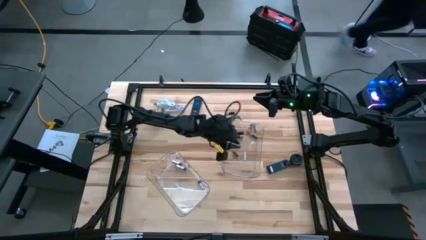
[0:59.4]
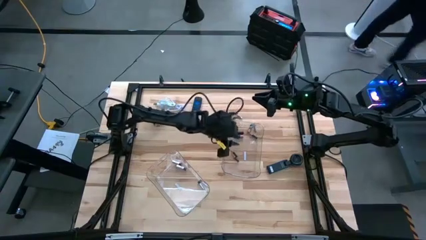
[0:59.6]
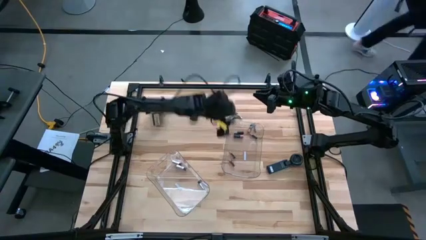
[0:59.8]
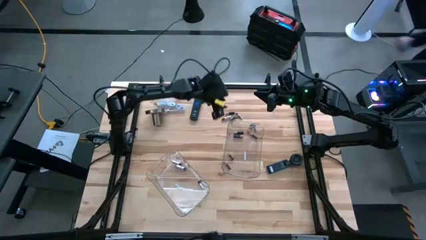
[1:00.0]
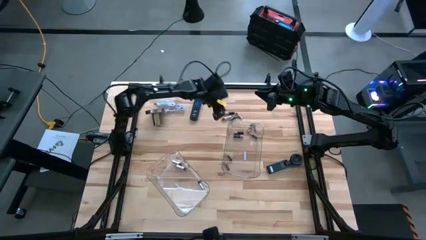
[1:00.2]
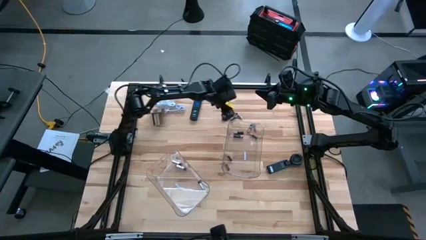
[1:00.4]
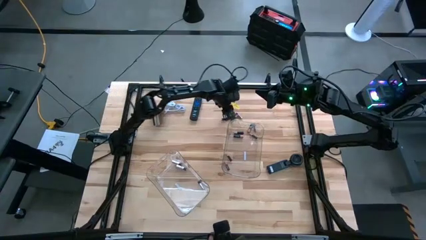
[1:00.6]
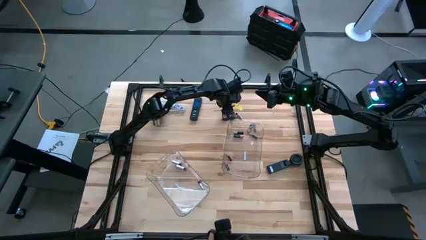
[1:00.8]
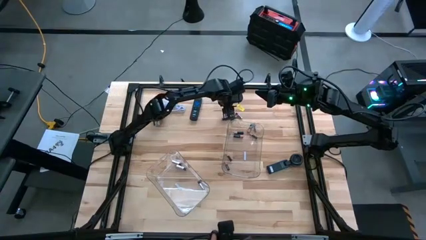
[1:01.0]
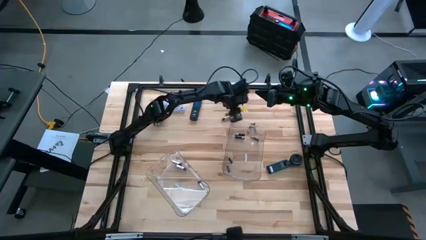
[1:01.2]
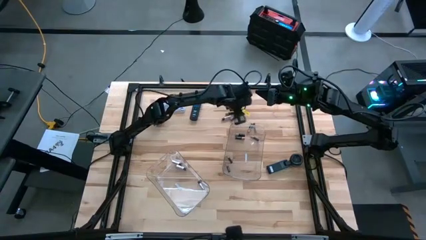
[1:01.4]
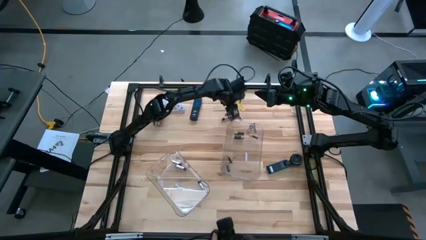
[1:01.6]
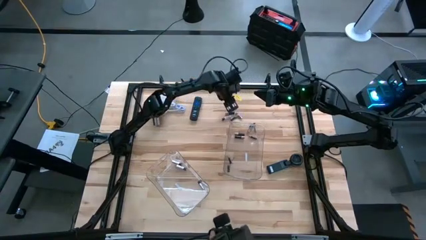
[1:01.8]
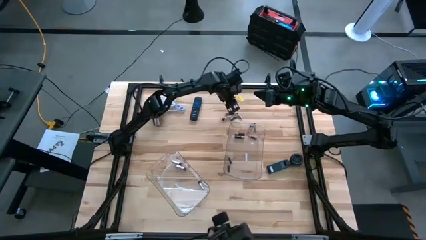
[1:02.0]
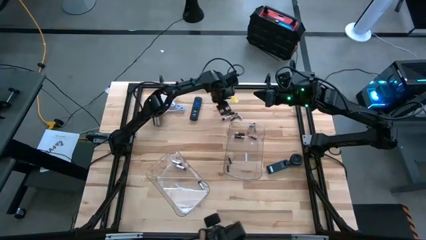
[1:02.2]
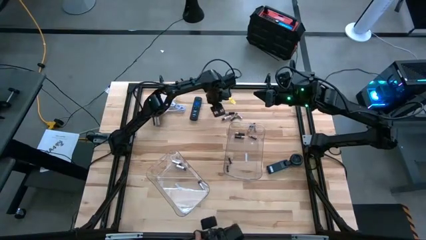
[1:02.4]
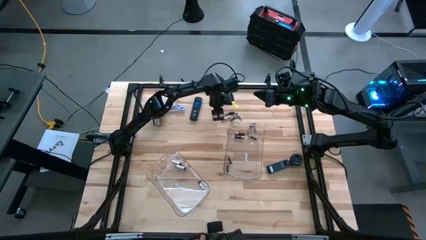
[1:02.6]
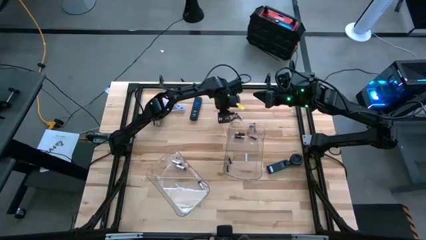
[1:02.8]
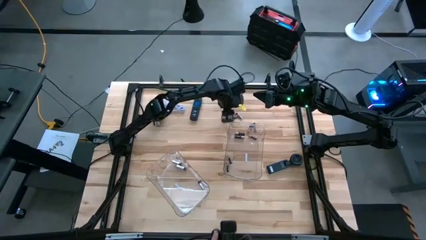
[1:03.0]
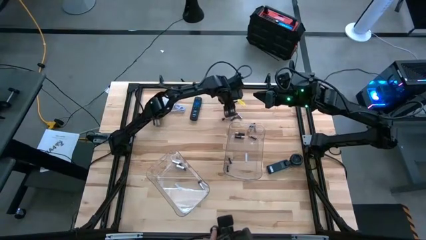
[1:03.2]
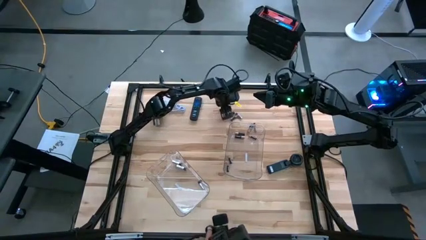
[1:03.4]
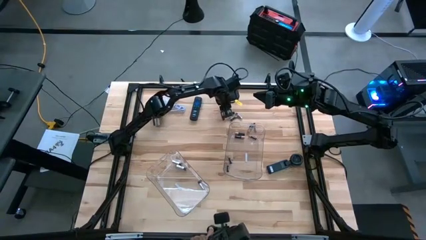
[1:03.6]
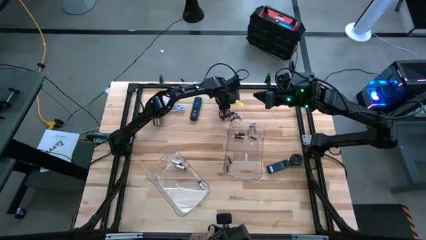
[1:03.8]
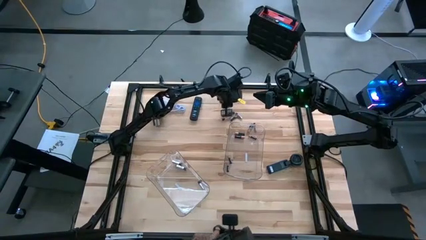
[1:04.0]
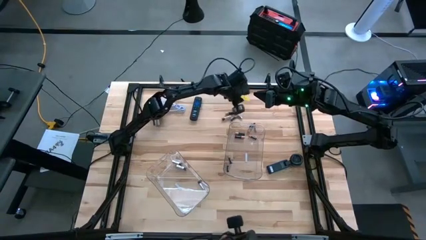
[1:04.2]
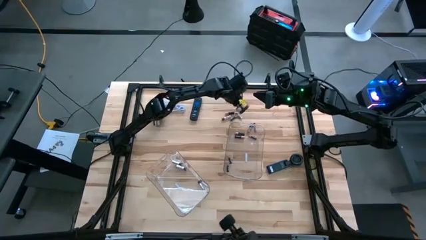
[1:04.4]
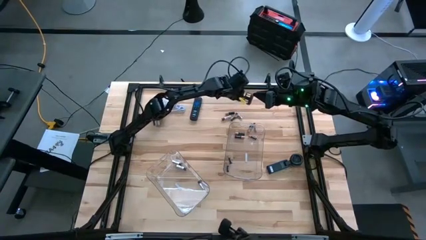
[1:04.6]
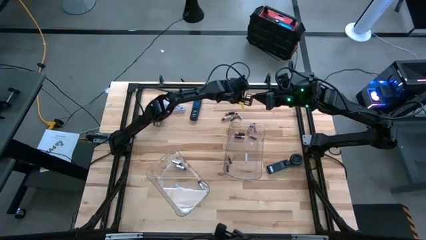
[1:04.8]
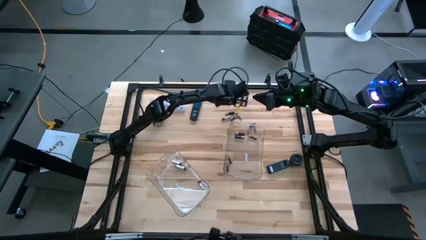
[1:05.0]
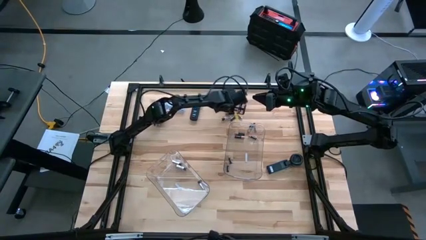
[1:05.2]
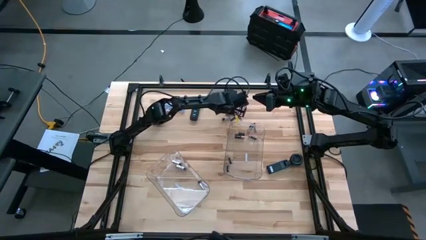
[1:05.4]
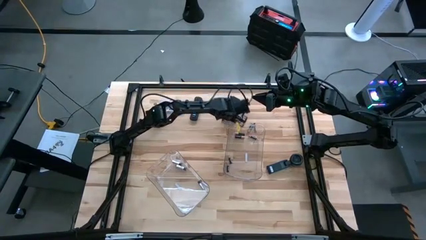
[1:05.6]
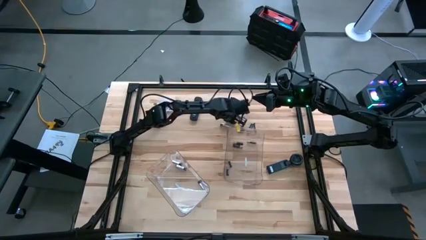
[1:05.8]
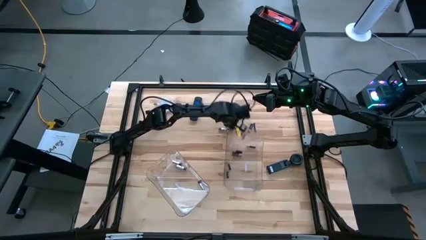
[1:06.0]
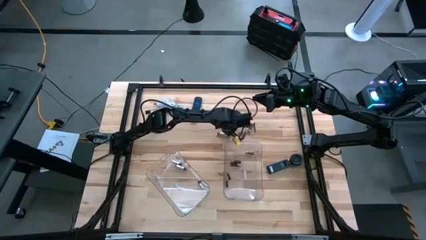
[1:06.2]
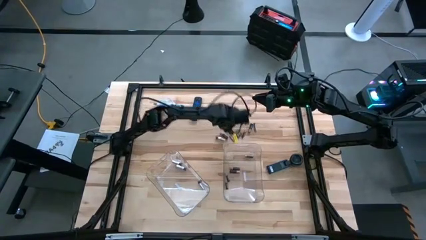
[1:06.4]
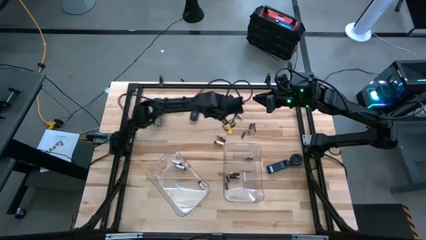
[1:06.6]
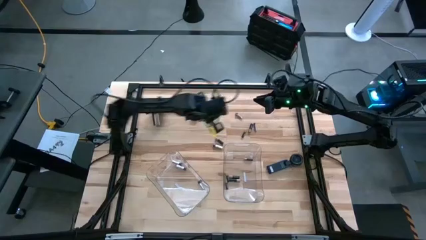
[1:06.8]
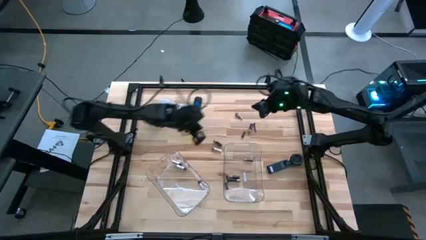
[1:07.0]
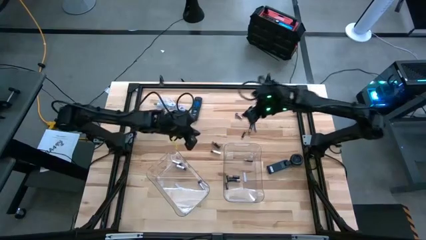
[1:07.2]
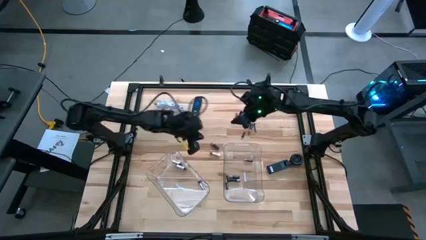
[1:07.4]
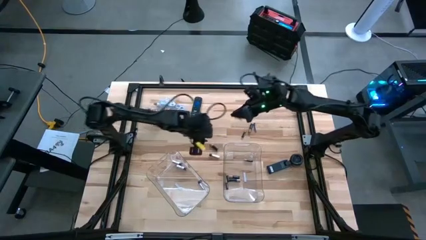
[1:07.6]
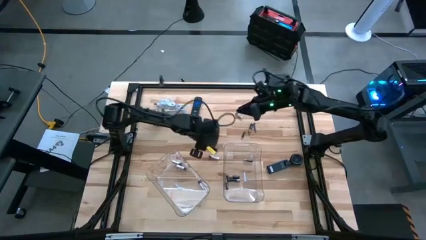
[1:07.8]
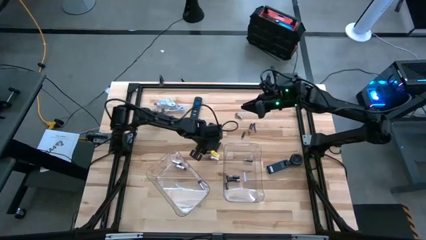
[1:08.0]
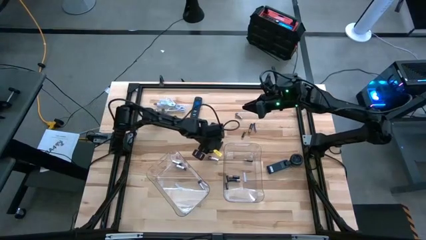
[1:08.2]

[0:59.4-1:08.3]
Task: Sort batteries
Put the black battery into the right transparent bin

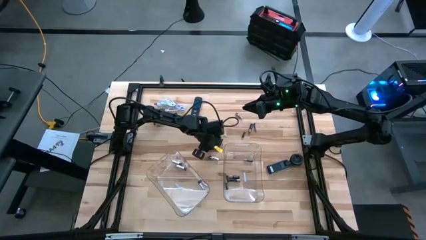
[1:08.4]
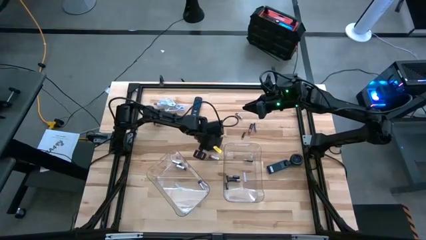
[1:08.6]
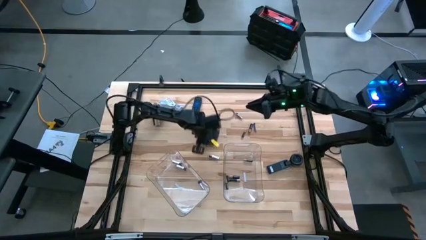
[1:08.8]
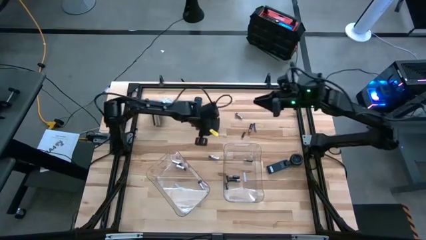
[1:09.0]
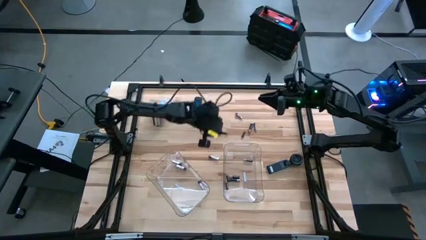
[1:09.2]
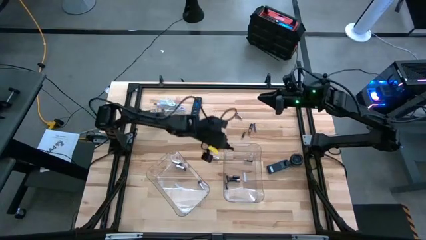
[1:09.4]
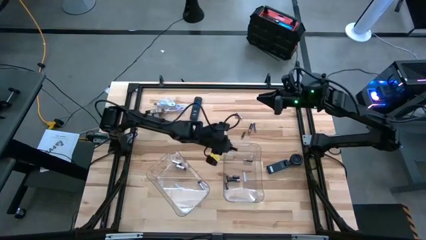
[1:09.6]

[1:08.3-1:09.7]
Put the black battery into the right transparent bin

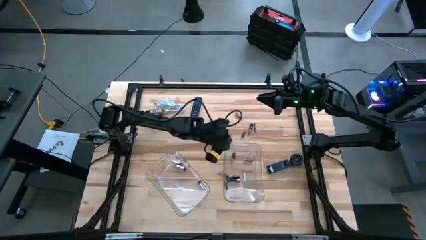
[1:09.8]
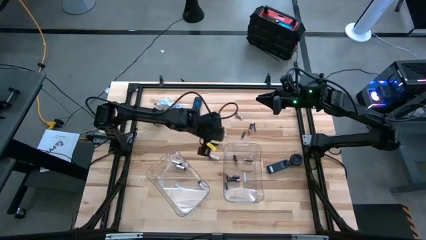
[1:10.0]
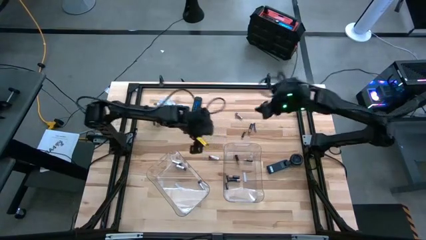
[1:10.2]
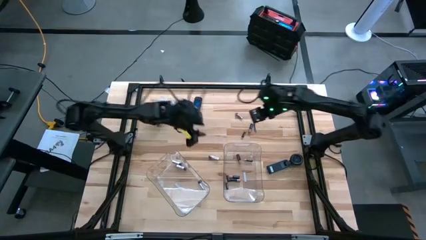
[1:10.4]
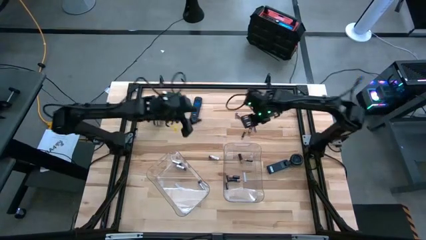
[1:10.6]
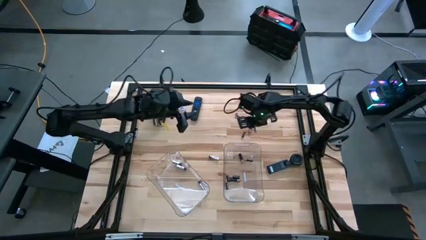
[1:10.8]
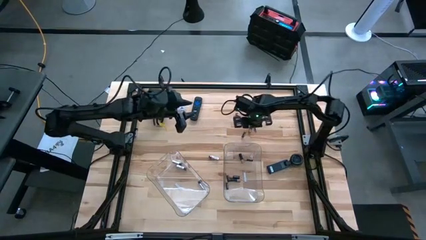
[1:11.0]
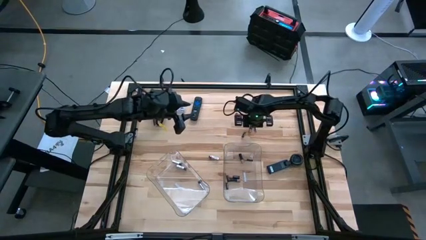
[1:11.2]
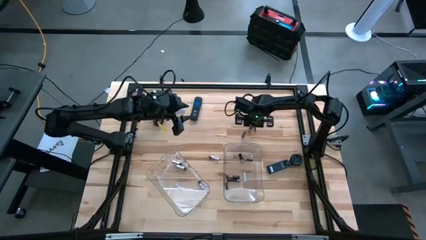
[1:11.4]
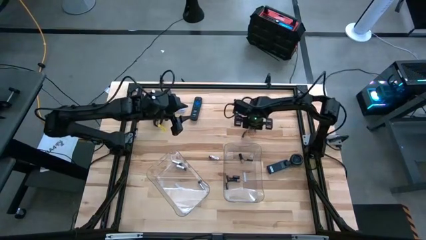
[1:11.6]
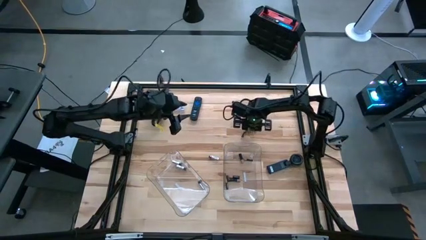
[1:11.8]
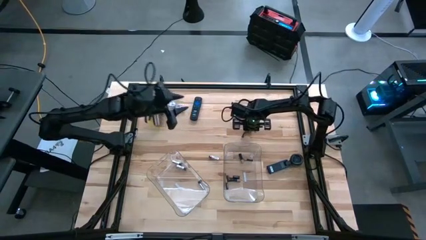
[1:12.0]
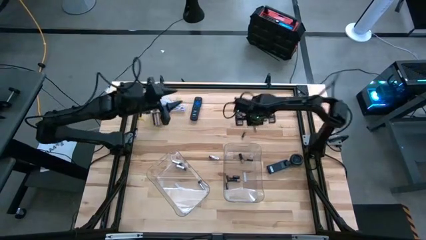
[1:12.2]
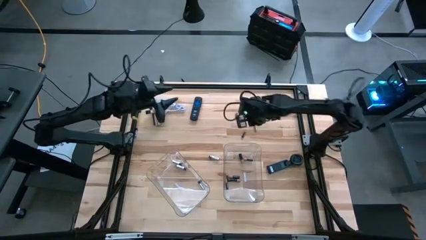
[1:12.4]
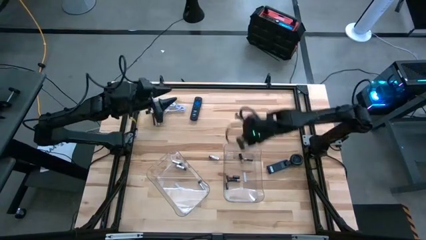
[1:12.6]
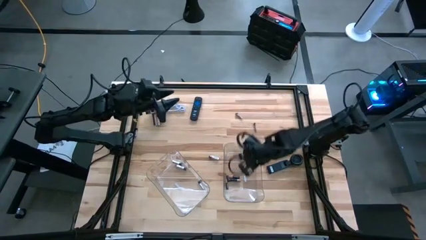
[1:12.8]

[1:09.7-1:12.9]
Put the black battery into the right transparent bin

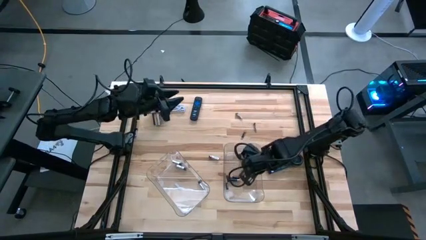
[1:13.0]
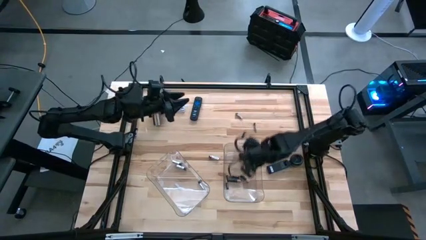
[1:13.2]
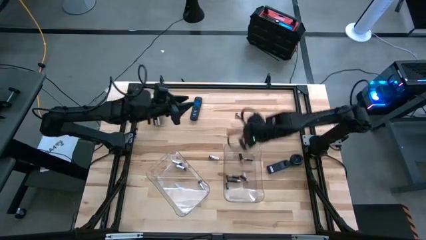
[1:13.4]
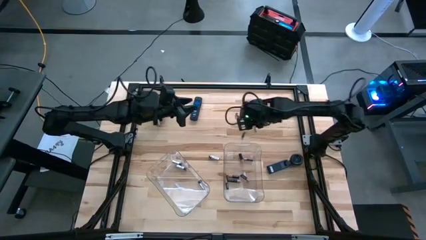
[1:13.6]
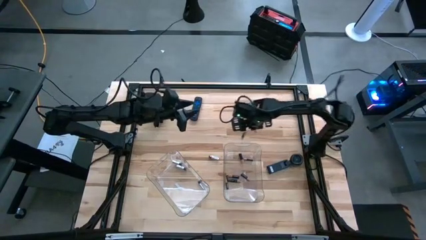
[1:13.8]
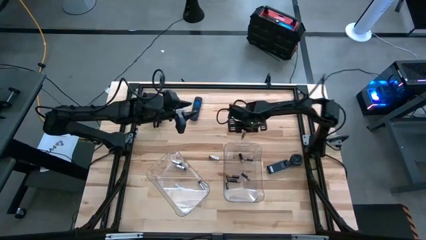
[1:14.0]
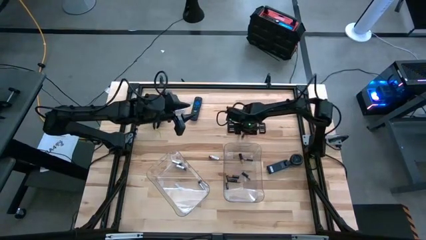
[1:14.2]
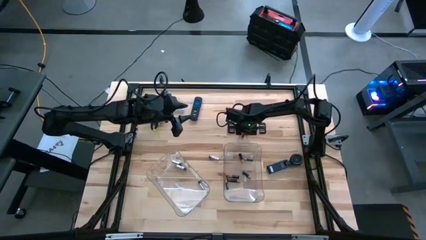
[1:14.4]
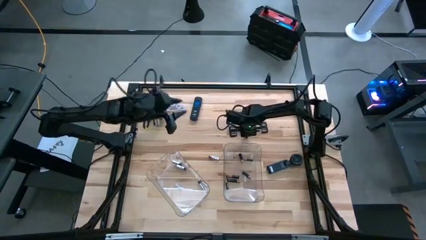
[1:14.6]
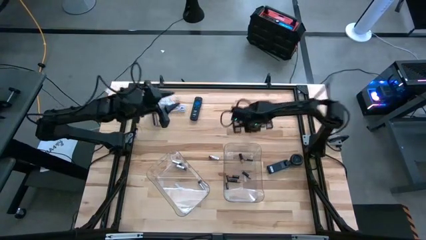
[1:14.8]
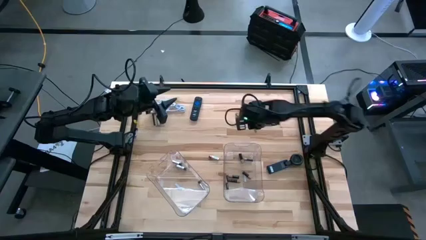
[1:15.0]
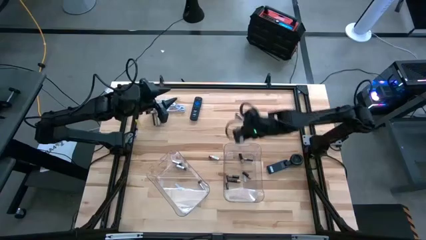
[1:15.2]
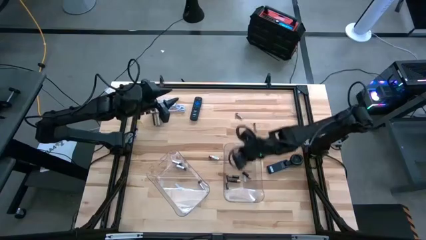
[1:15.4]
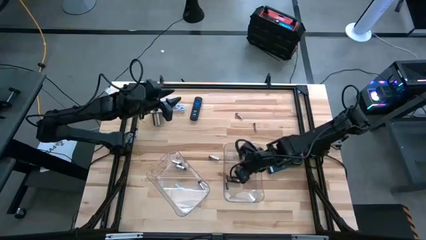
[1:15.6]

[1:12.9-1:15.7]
Put the black battery into the right transparent bin

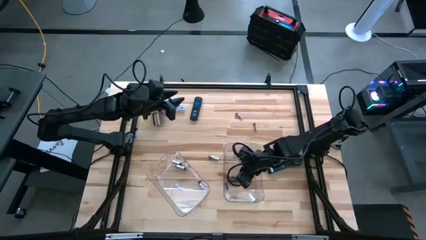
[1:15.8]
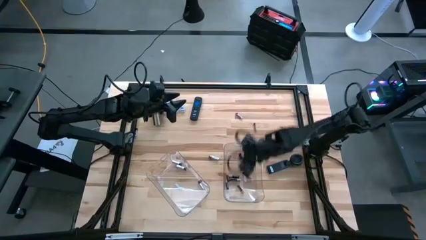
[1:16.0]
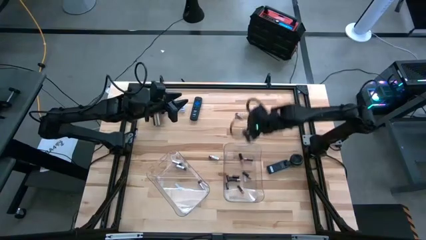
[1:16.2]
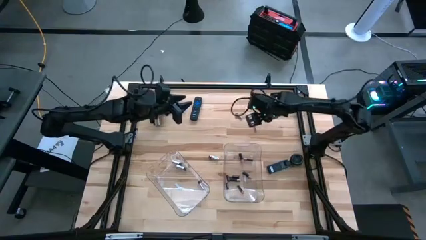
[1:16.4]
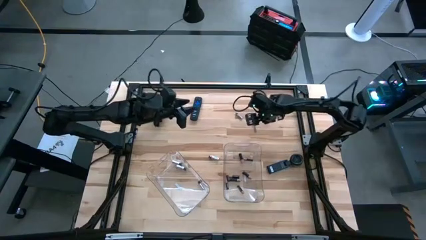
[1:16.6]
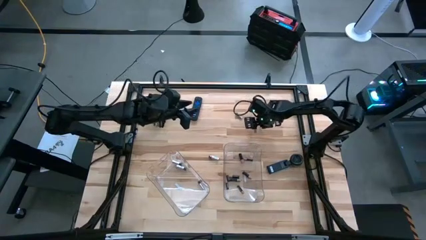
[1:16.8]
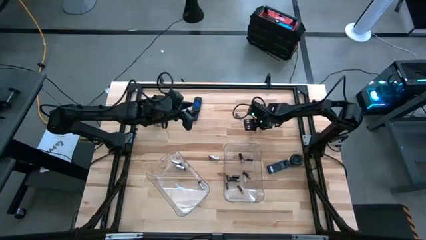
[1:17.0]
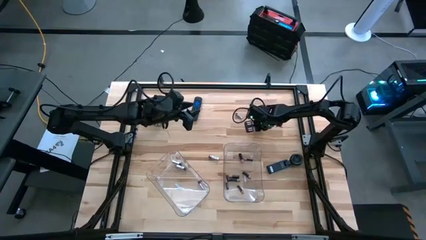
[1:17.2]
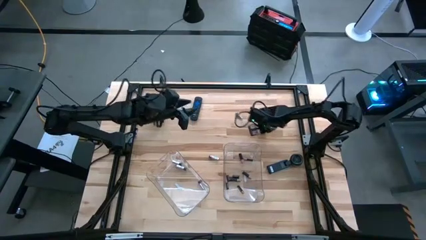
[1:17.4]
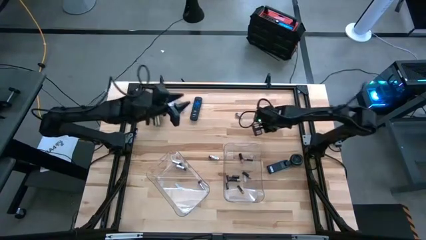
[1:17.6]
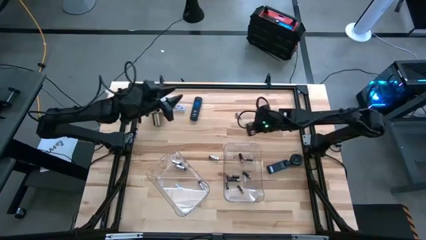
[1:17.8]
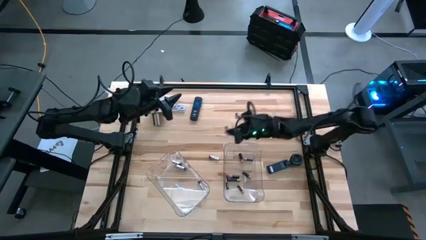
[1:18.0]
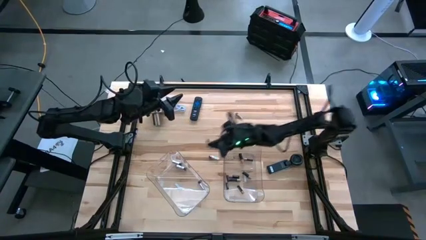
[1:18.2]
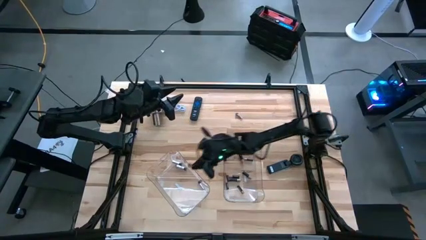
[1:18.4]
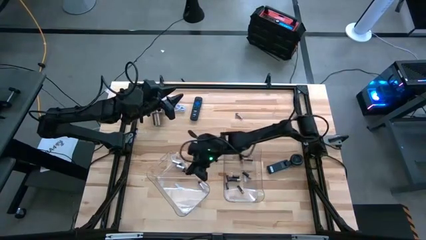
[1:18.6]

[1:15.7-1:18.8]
Put the silver battery into the left transparent bin
